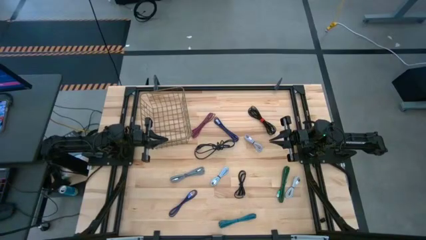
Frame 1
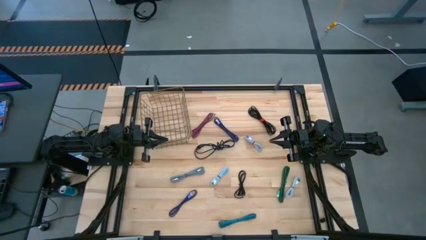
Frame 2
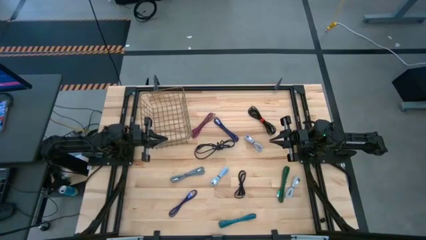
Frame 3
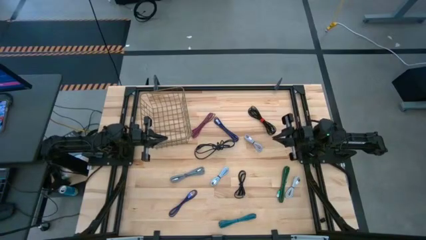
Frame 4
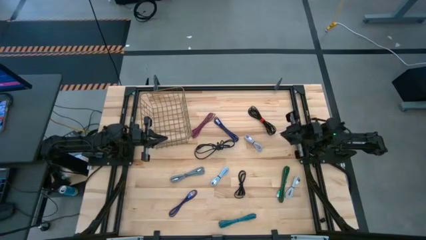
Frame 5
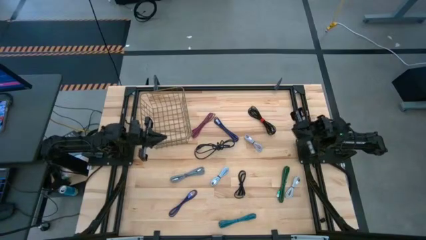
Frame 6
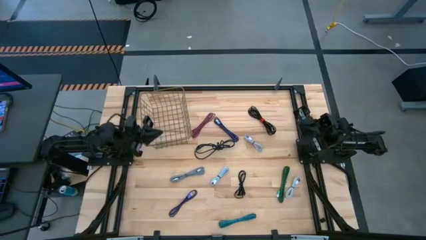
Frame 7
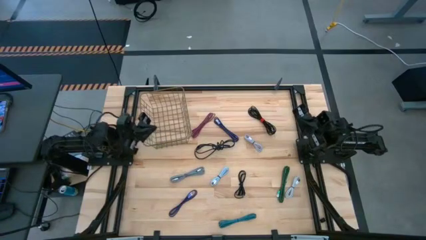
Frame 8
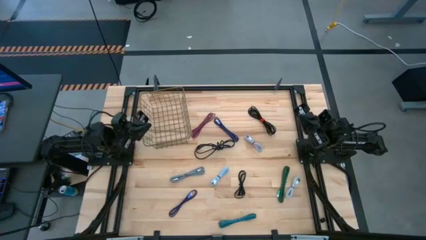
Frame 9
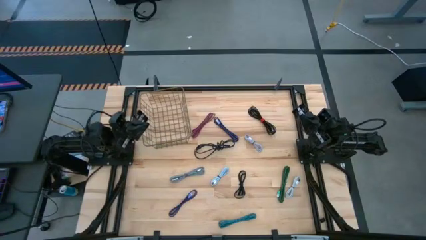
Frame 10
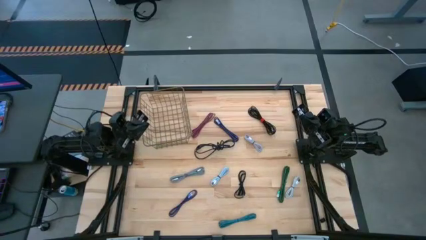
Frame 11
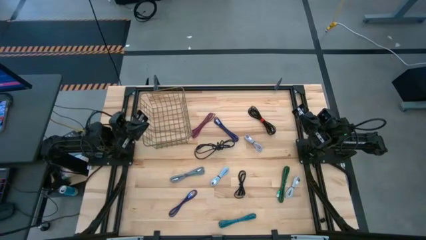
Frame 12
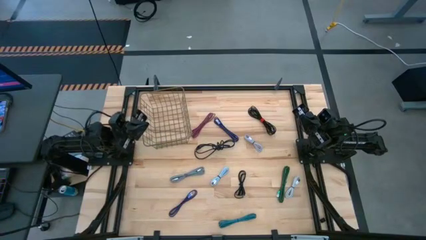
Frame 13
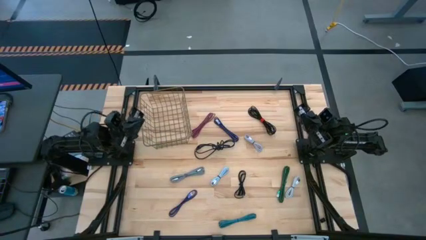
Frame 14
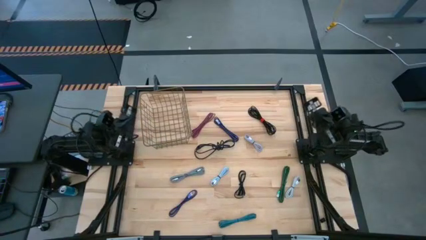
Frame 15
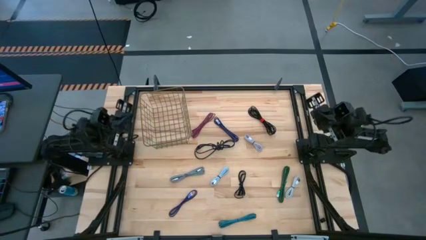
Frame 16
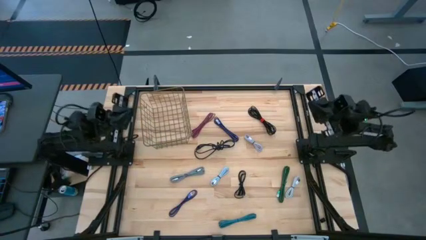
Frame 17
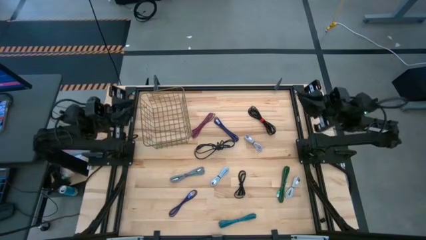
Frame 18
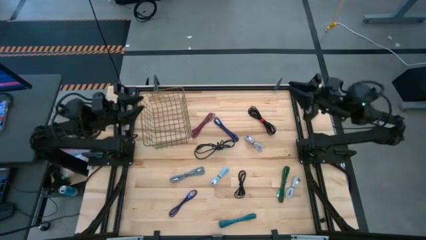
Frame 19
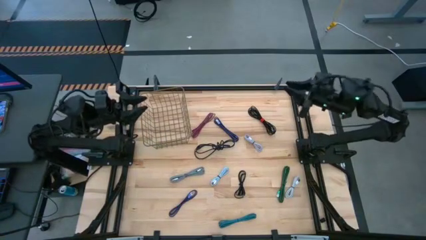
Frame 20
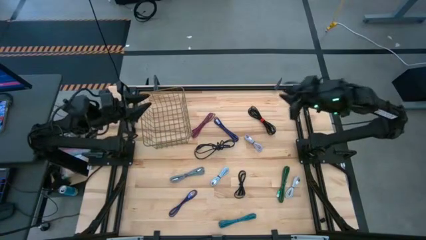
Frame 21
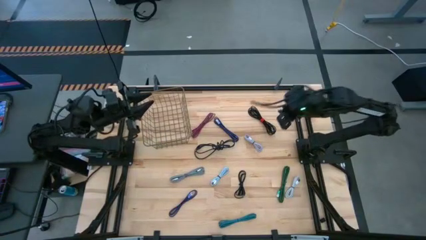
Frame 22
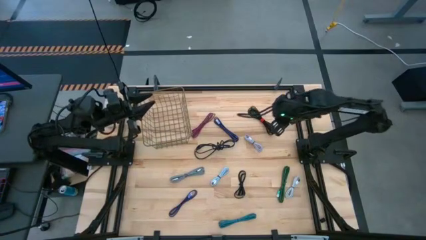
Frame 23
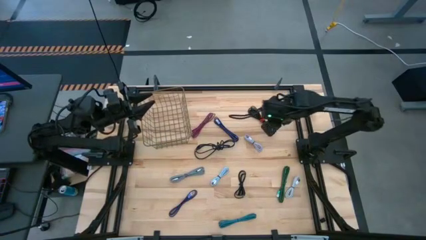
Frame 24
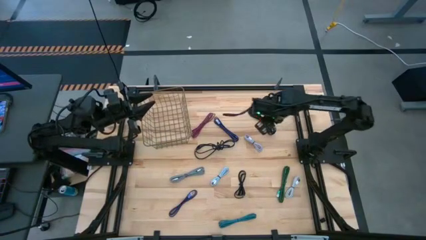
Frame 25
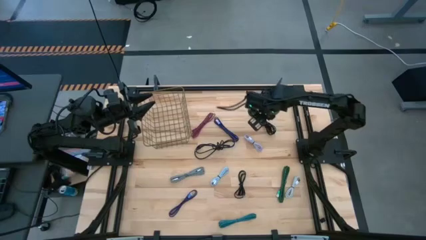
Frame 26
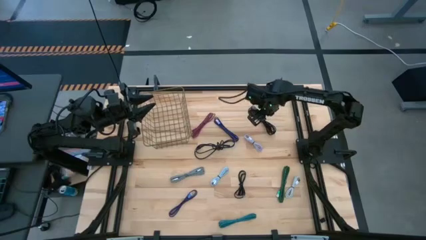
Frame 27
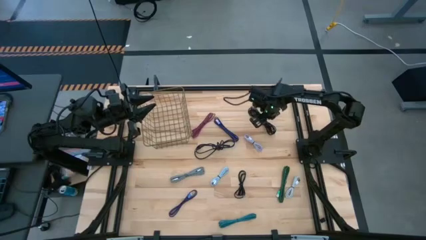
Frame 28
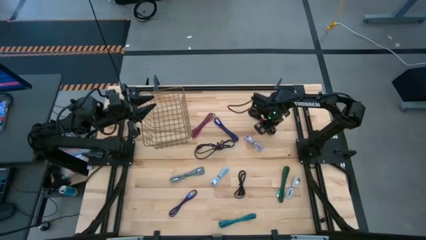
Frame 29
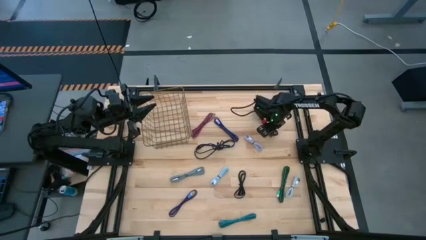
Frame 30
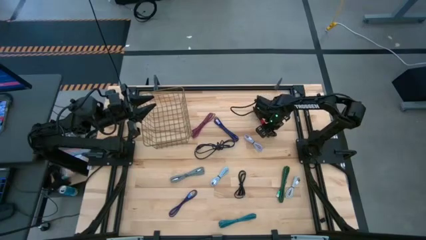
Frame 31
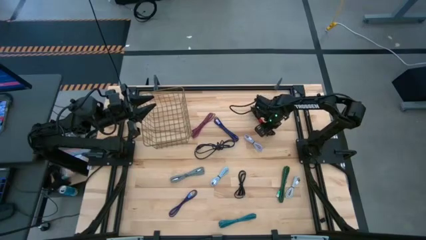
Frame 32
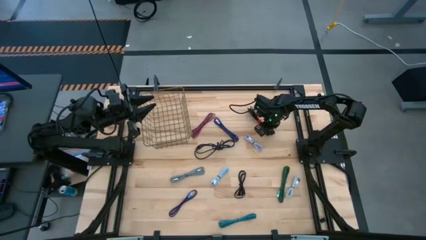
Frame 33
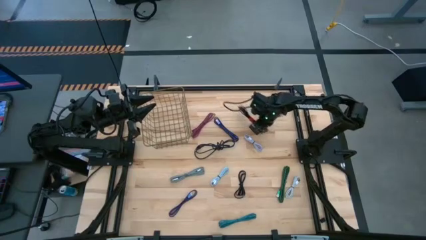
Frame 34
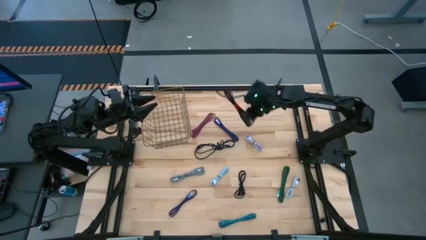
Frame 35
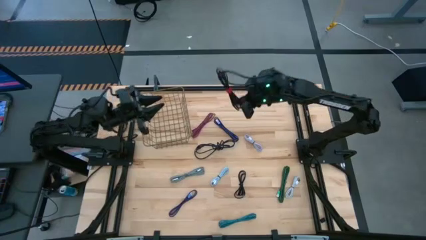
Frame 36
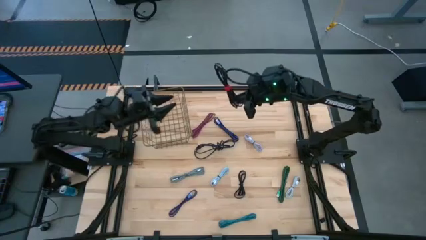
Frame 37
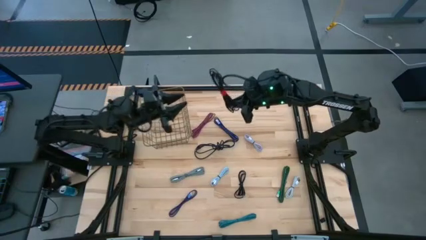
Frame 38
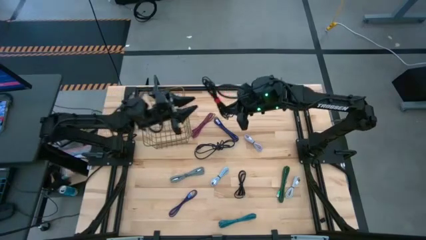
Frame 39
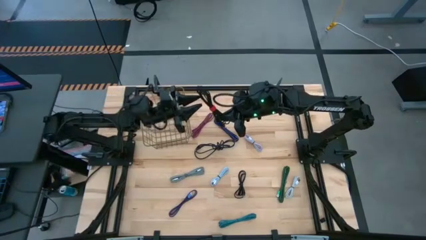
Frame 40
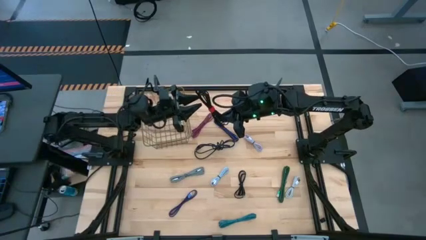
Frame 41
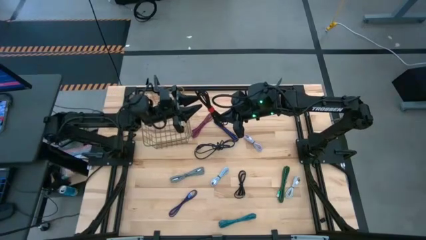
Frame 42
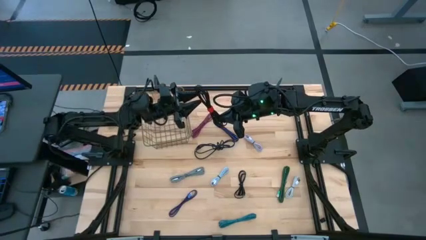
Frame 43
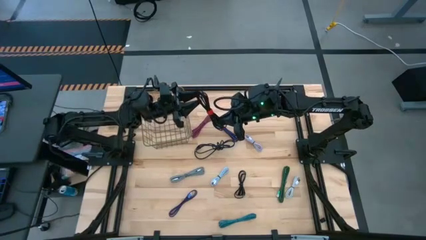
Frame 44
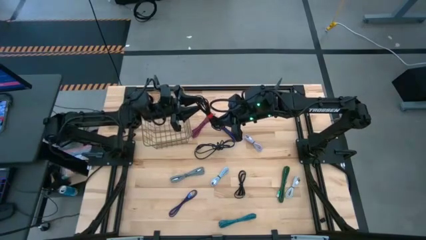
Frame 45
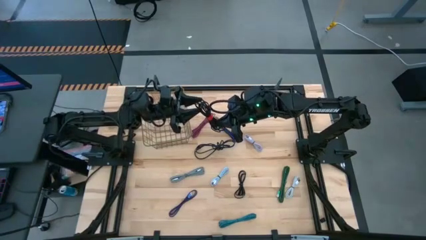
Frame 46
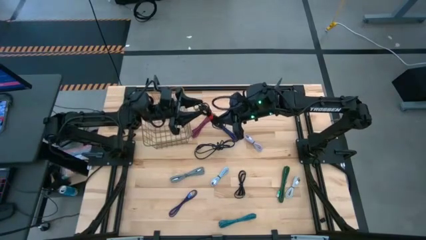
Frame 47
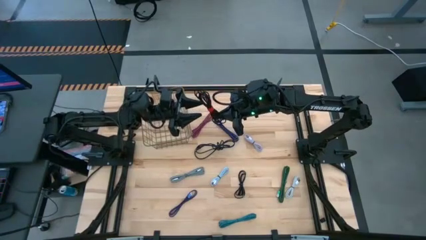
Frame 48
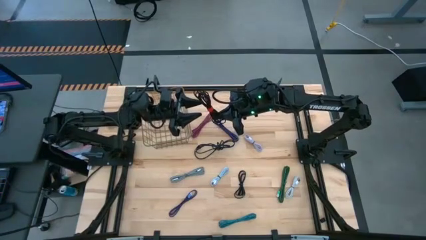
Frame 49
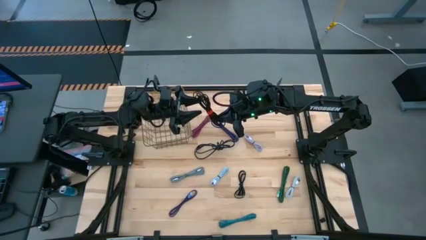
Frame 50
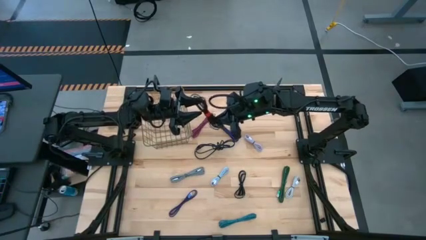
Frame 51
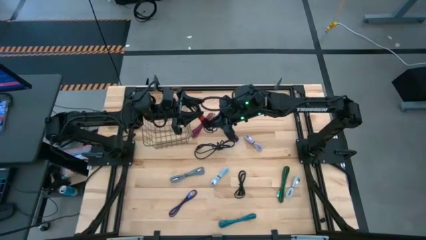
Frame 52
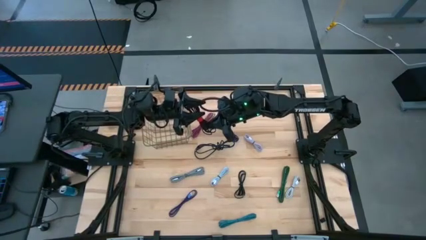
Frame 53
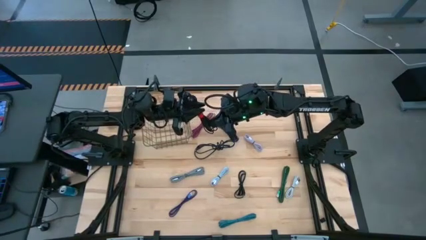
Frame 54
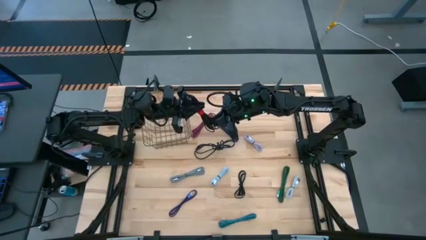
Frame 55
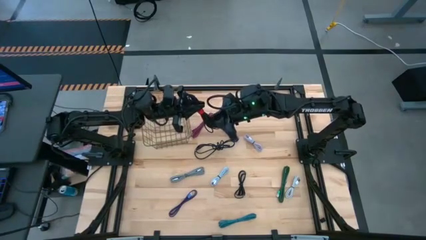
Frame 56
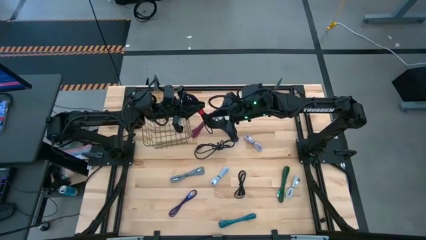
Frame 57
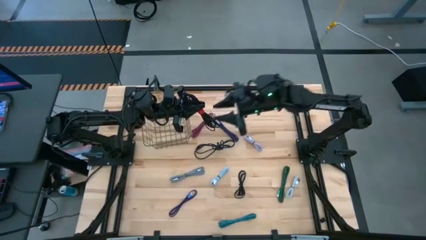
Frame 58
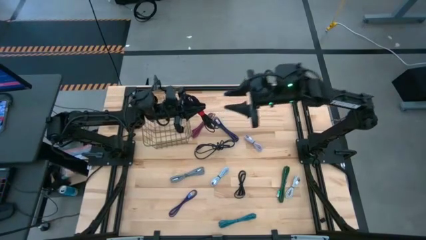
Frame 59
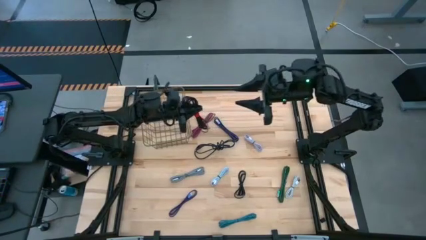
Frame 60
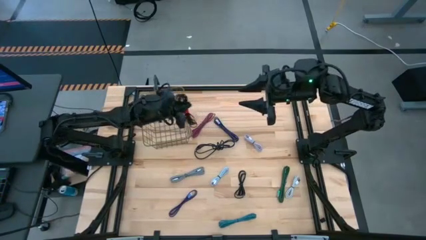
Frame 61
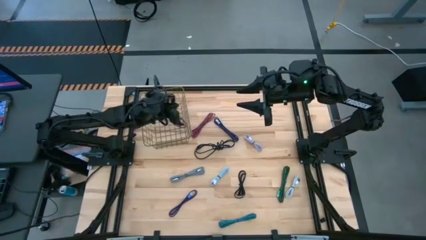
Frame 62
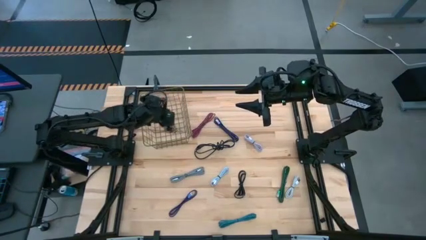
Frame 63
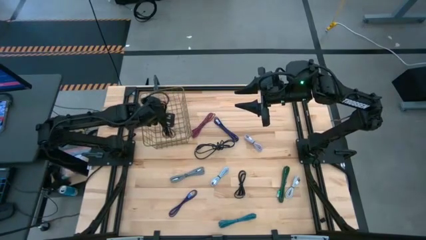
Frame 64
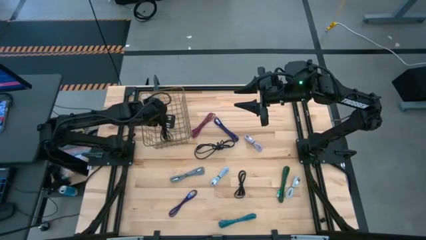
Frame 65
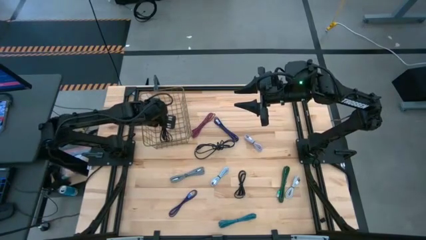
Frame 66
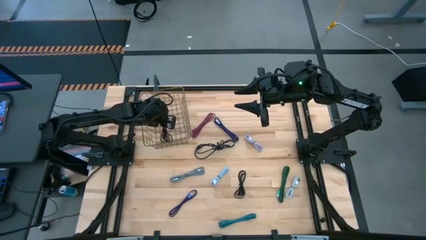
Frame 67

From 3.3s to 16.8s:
Task: Pick and place USB-C Cables
Put the top black charger cable into the gold wire basket

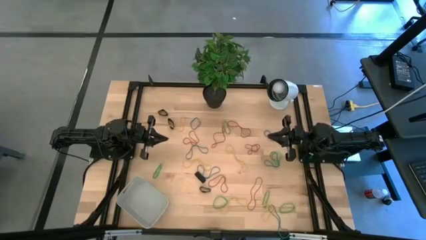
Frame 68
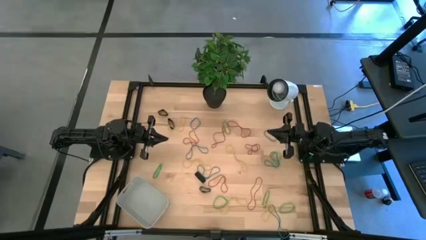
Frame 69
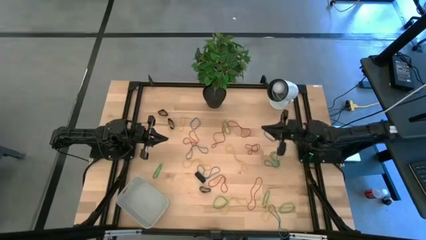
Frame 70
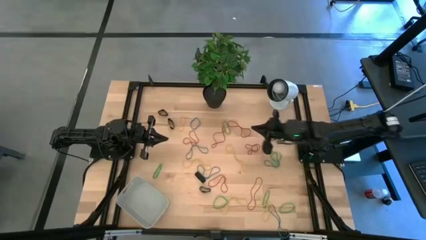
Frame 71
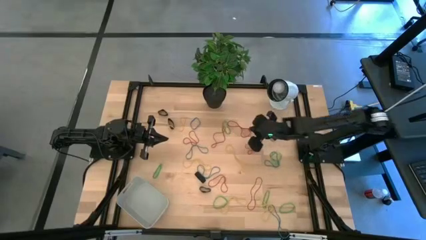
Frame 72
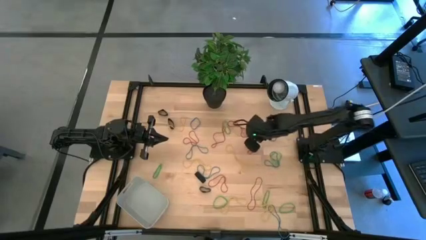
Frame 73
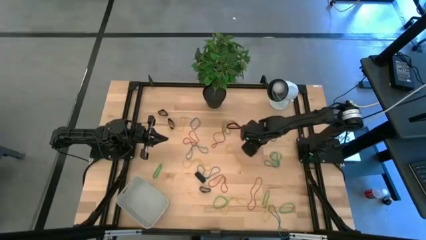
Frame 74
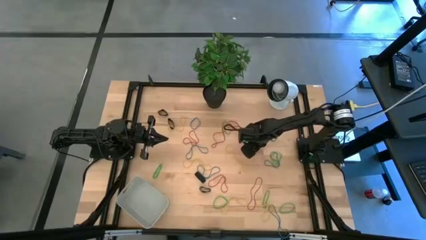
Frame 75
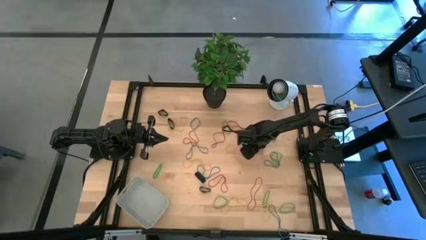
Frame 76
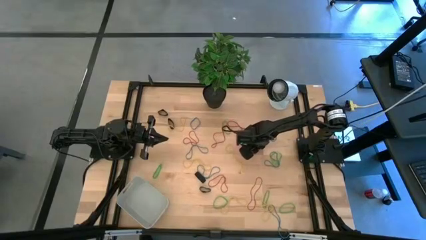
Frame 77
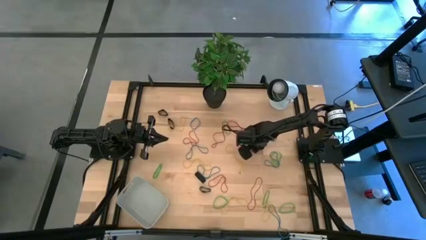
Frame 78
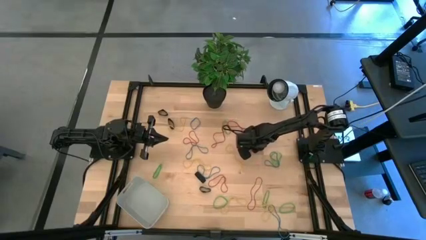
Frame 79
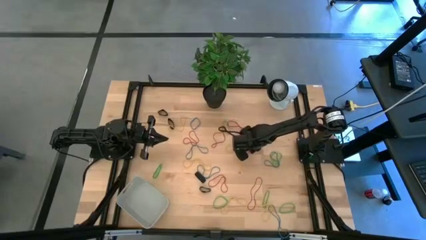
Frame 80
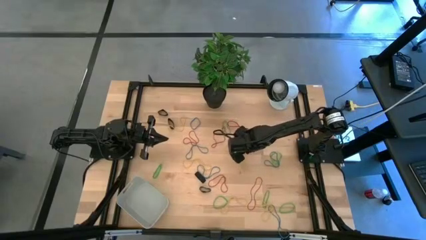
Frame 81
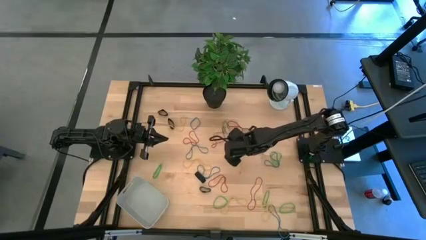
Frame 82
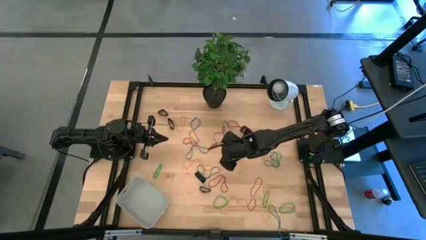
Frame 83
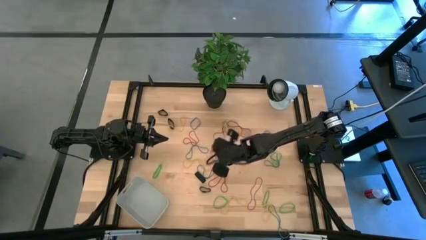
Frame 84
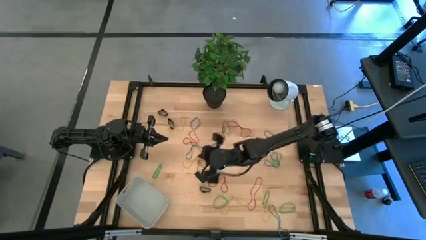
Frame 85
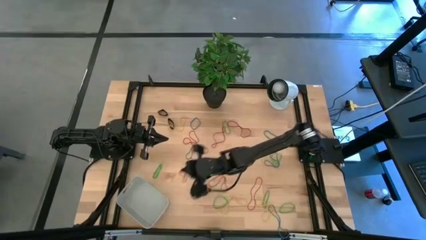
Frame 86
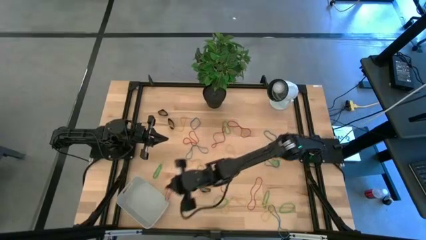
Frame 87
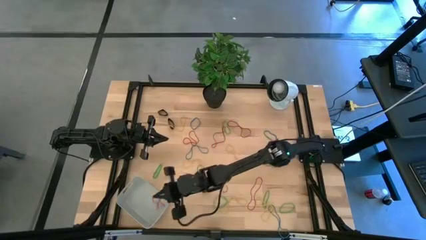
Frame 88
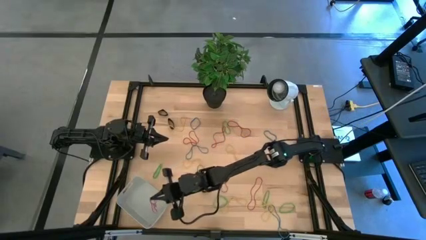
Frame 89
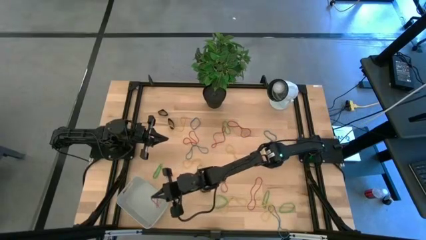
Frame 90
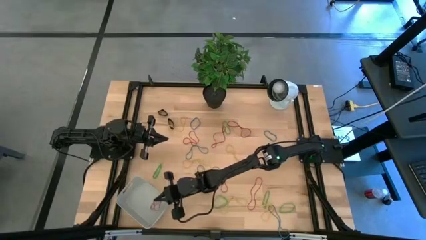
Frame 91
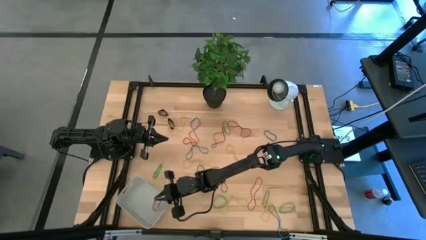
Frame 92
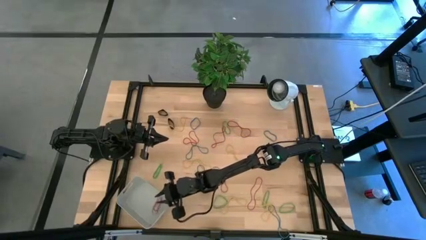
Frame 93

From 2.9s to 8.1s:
Task: Pick and place rubber bands into bin
Put the red rubber band into the gray bin
